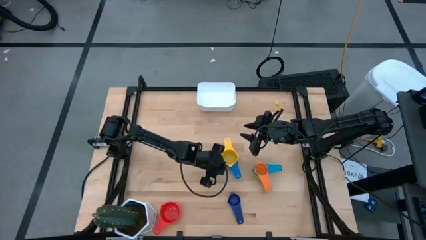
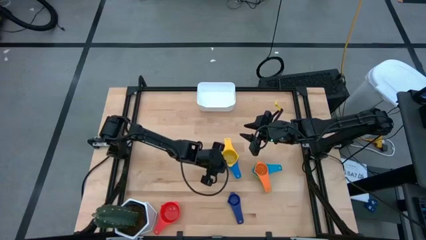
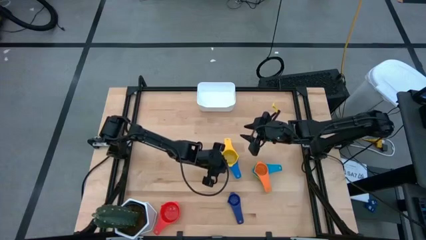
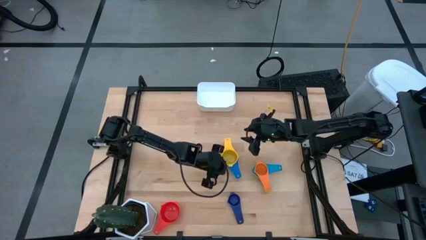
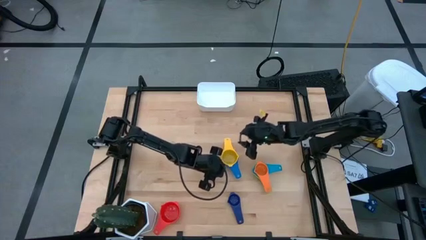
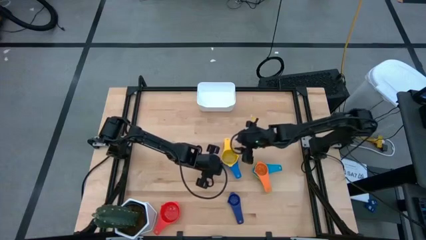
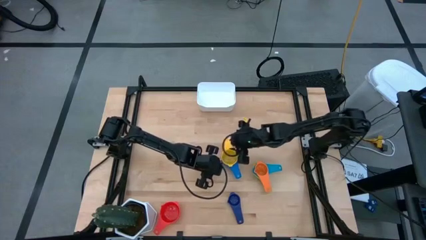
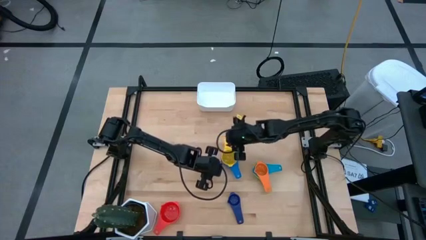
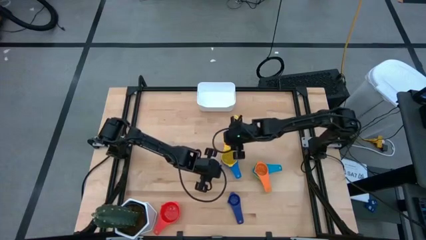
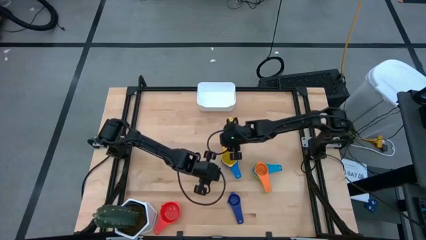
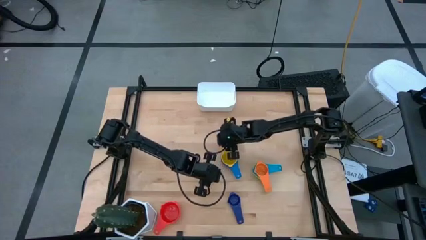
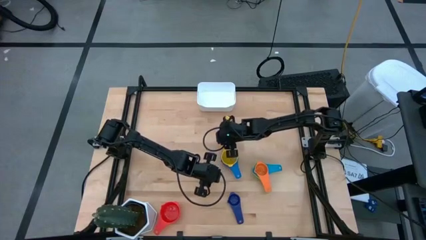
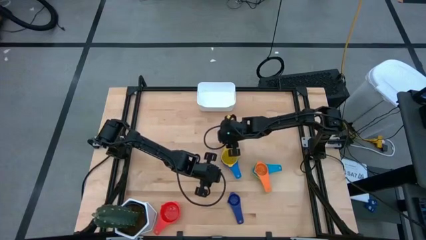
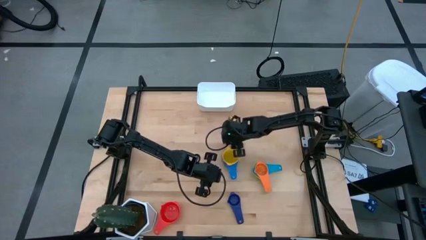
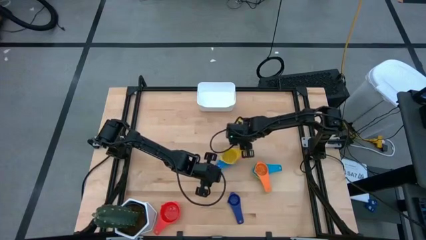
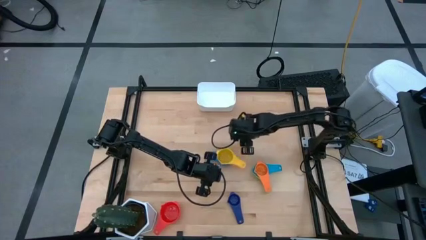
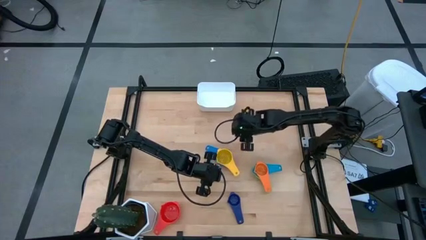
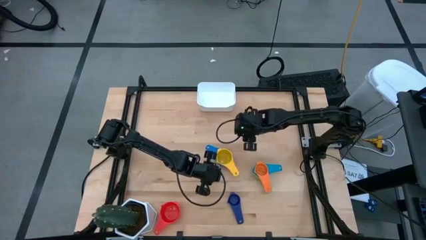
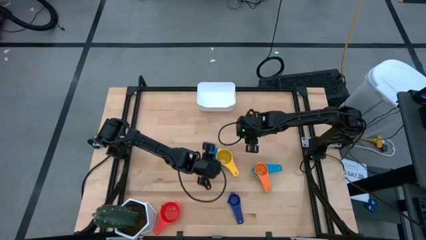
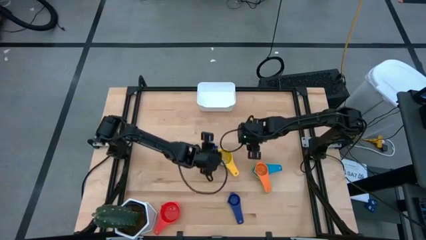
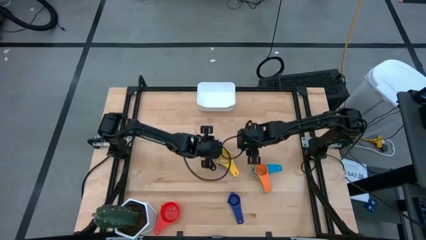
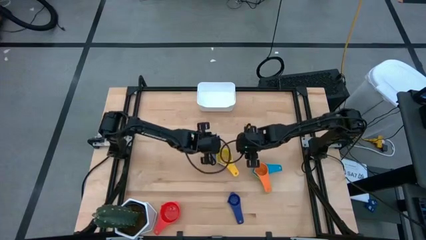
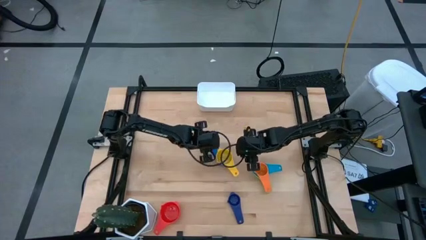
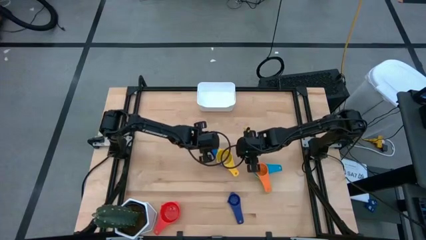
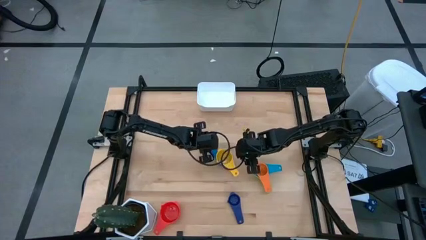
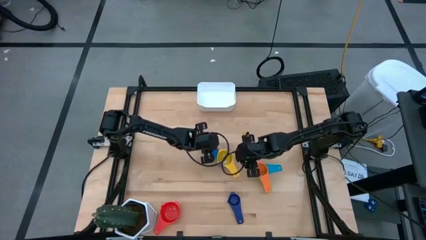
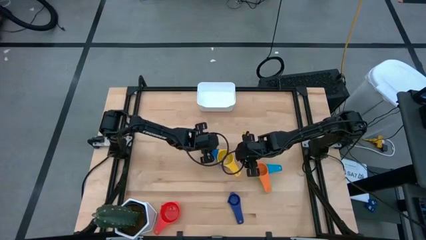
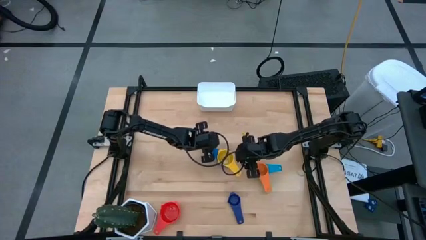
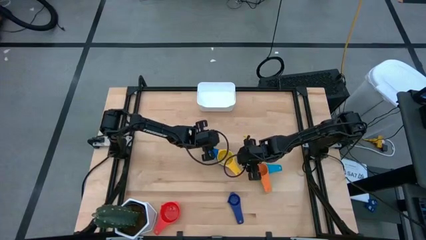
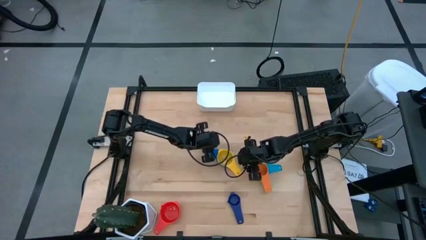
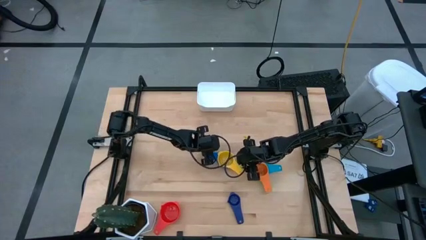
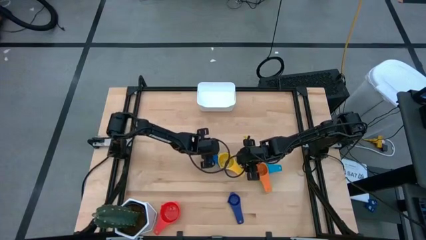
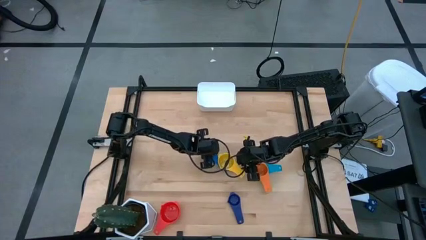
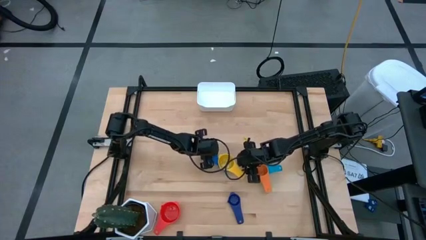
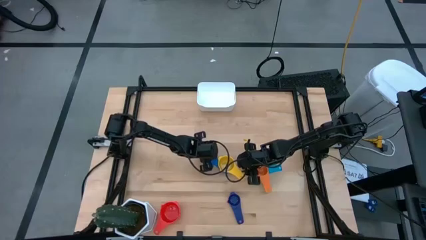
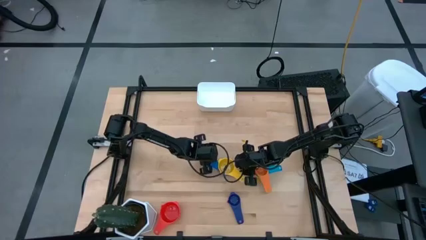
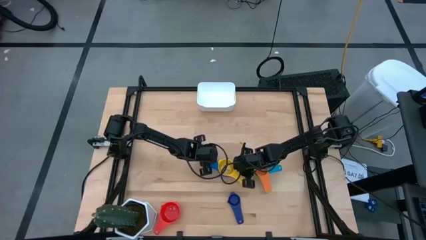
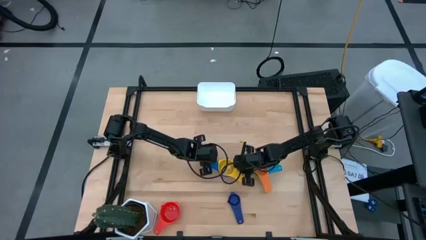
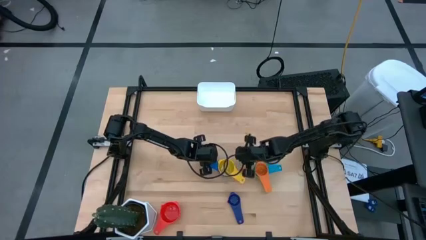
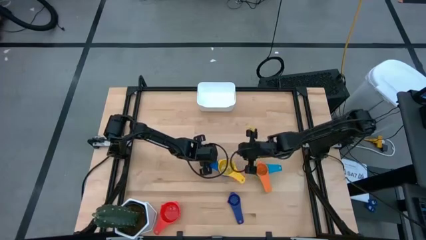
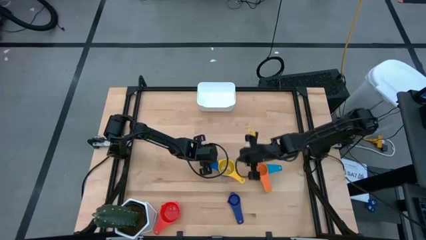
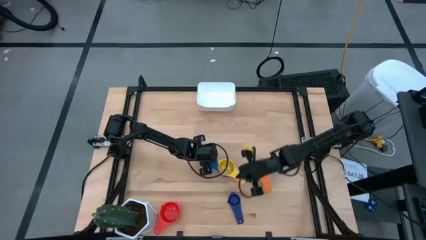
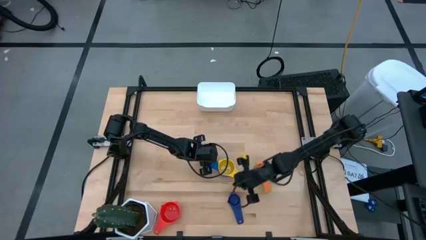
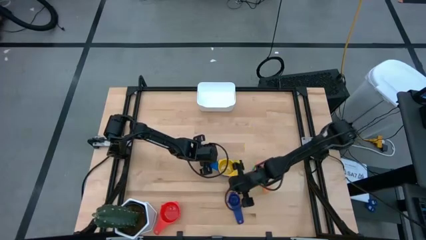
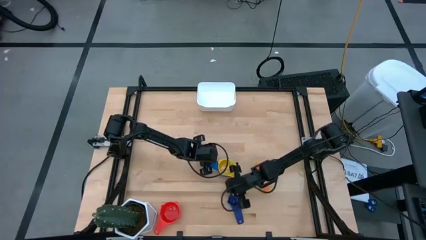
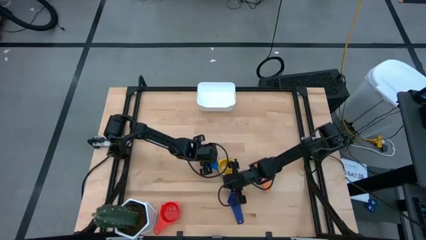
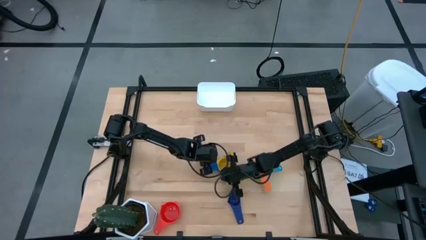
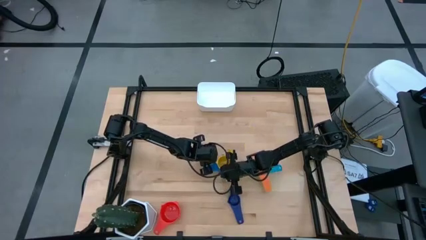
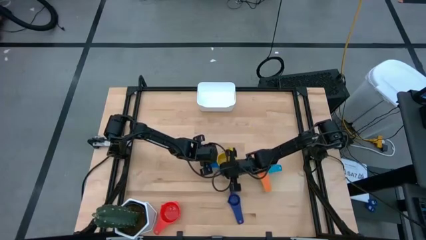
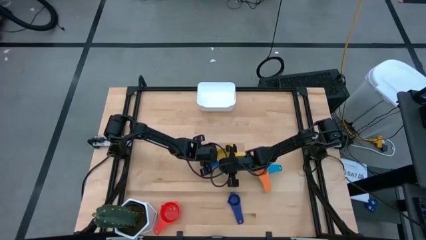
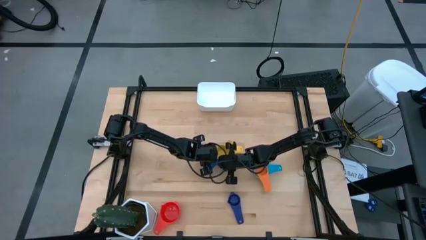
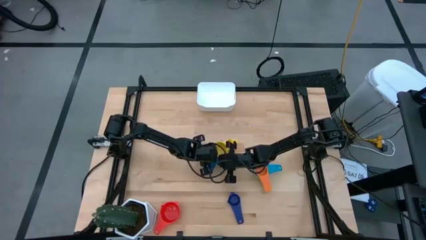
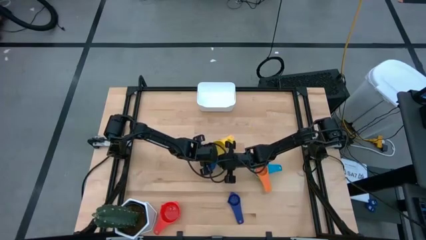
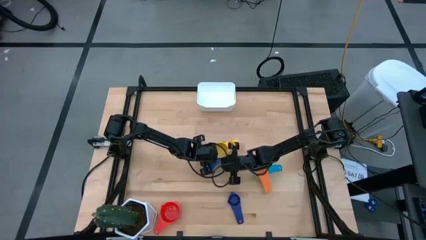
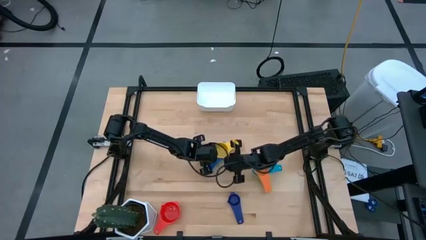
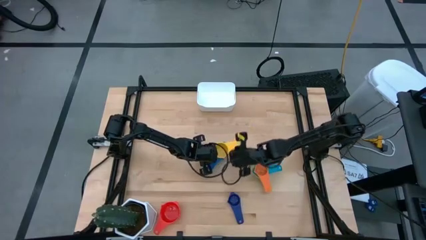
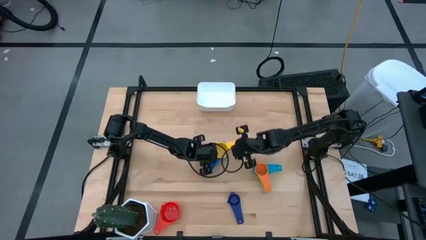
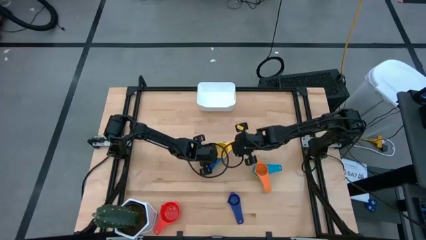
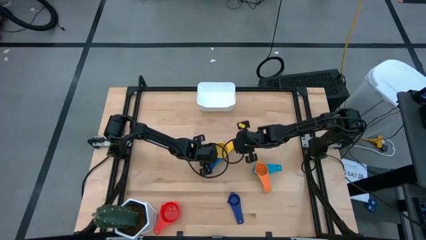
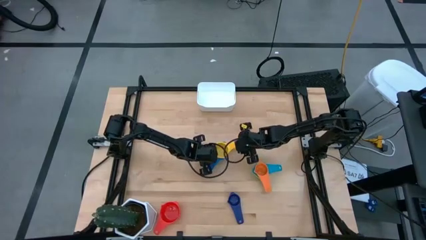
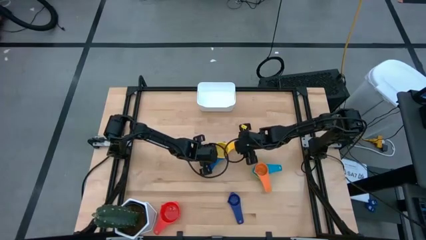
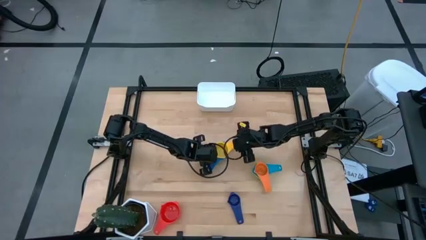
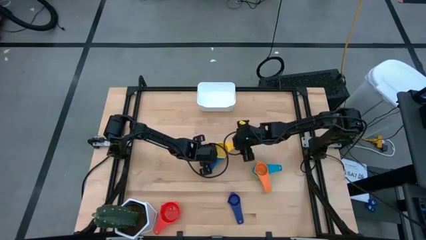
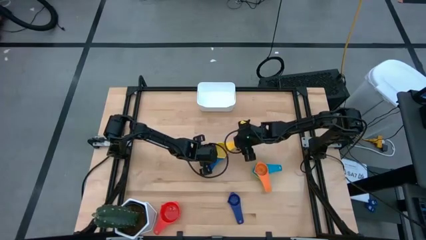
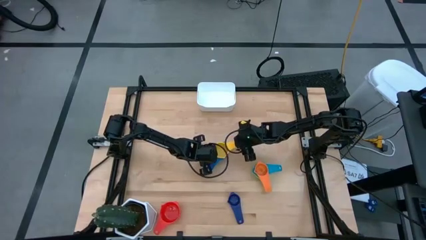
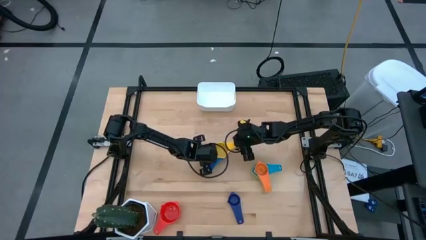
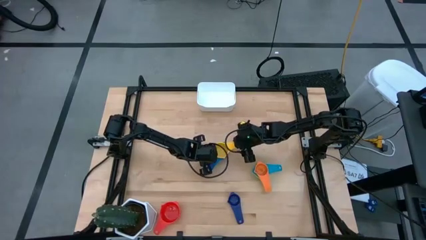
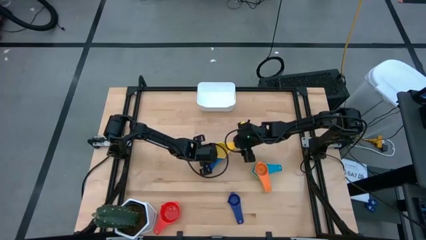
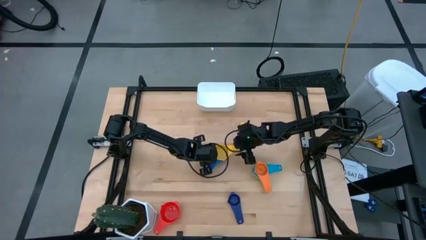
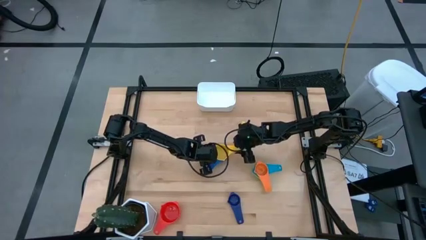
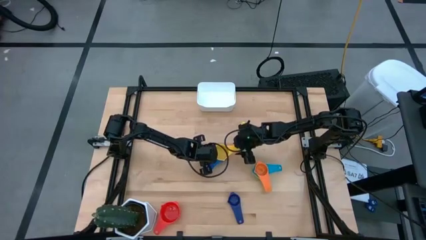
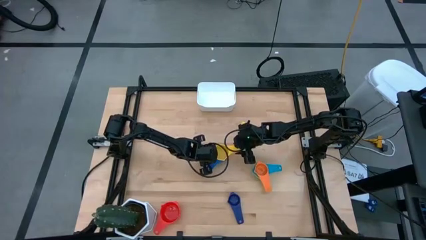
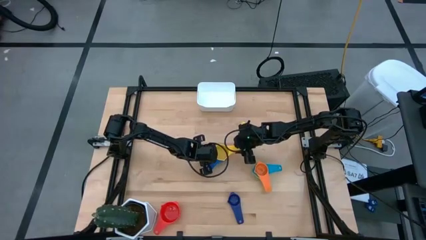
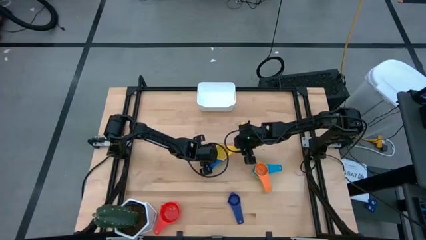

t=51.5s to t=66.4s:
Task: Nest measuring cups in basket
Adjust the left nested measuring cups
